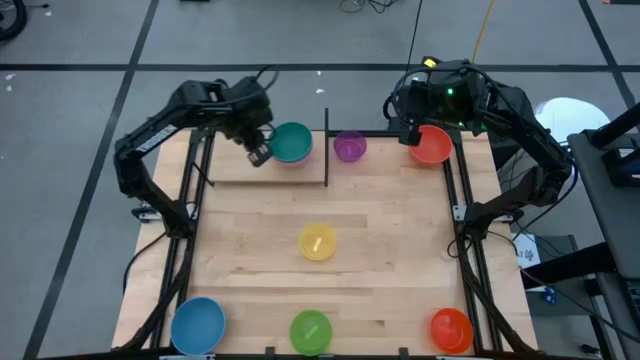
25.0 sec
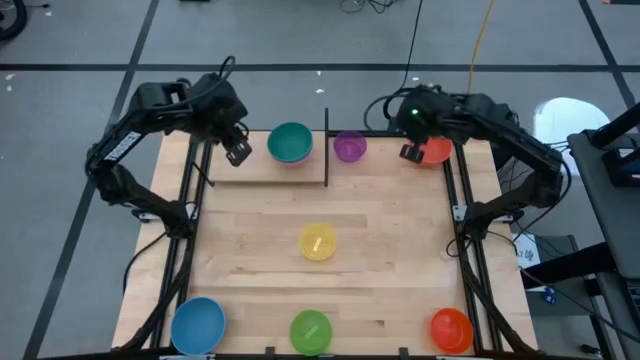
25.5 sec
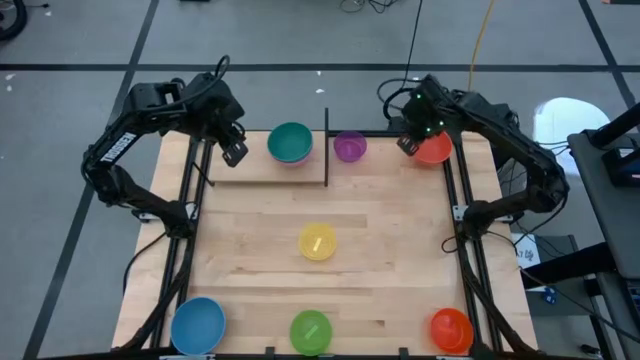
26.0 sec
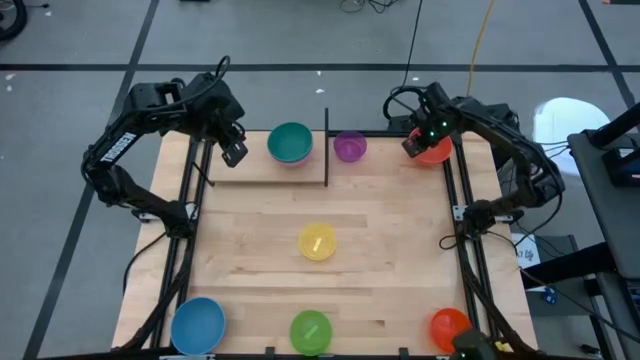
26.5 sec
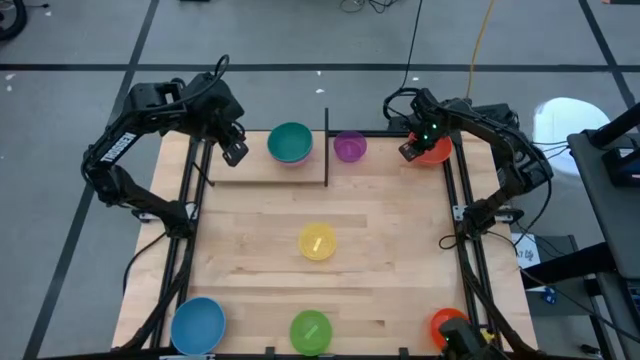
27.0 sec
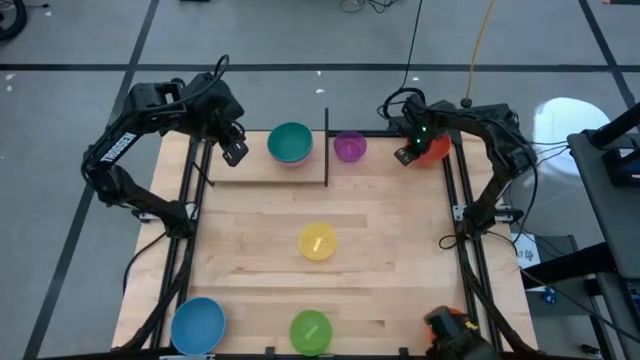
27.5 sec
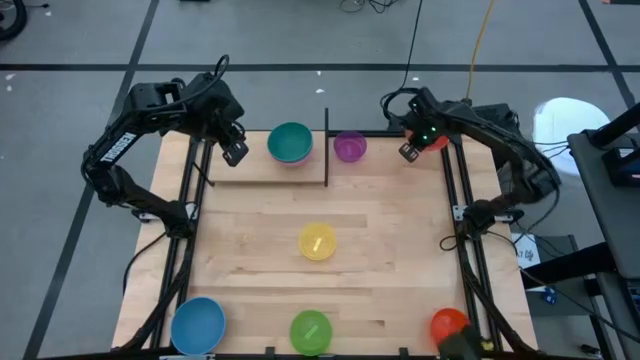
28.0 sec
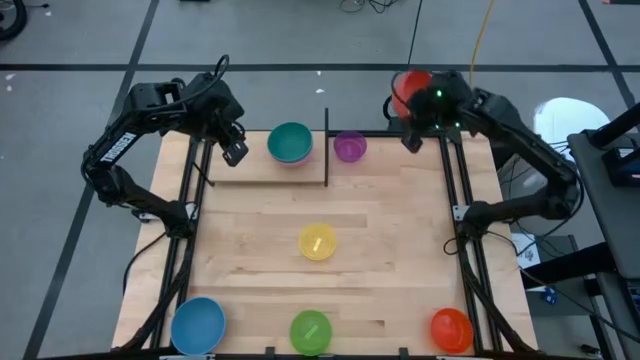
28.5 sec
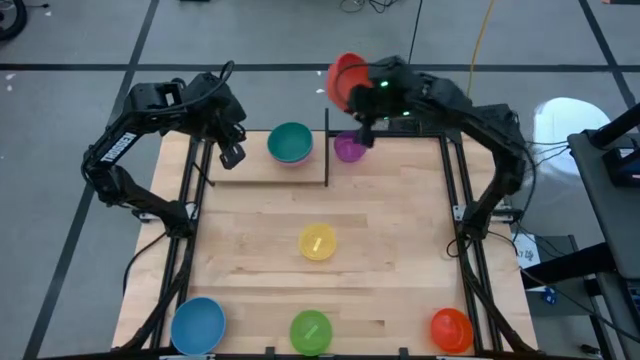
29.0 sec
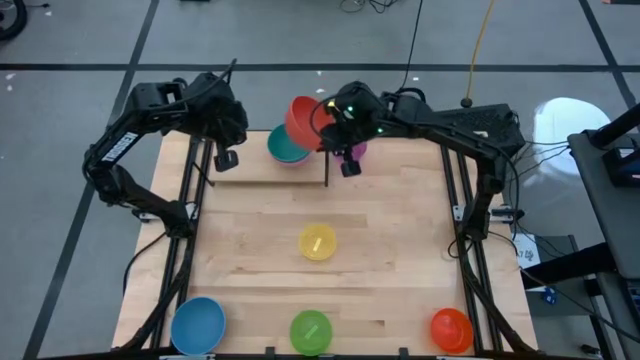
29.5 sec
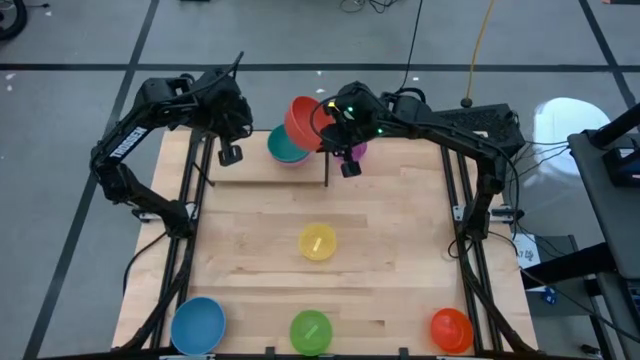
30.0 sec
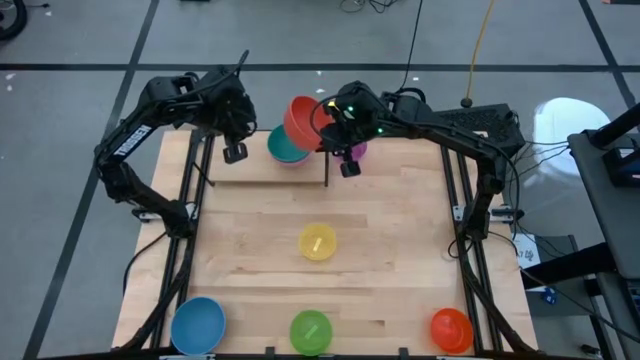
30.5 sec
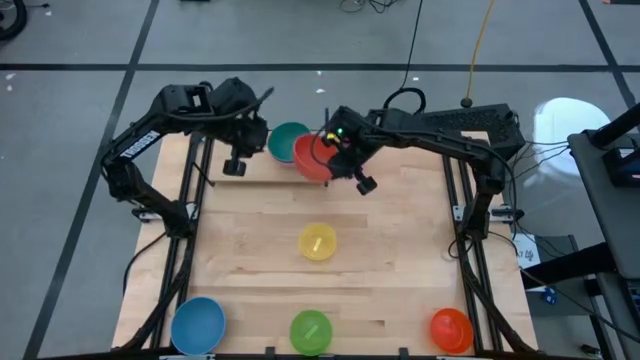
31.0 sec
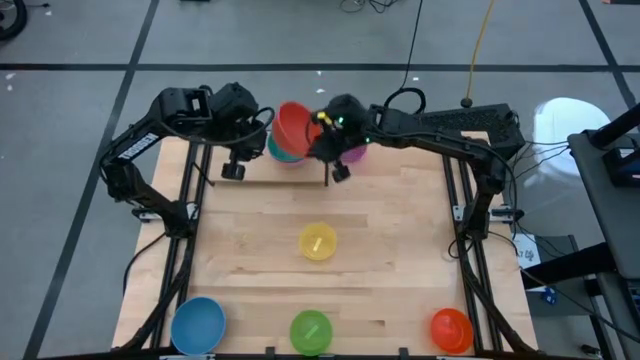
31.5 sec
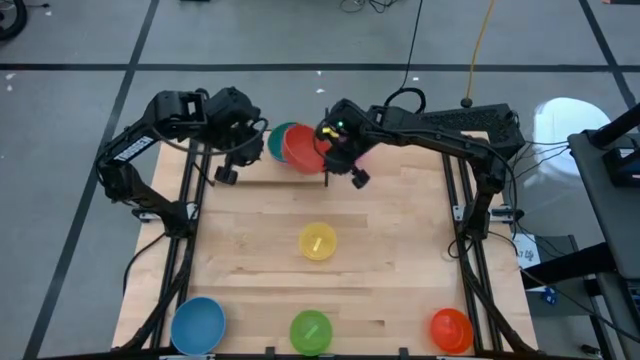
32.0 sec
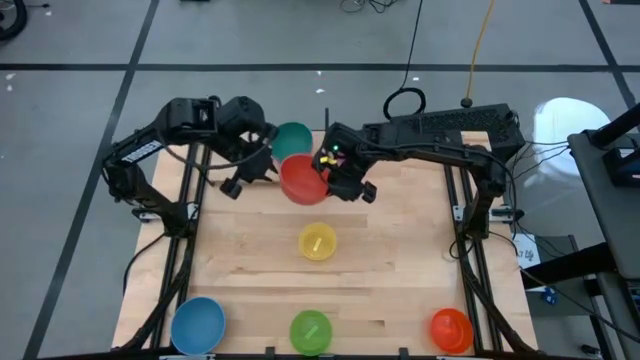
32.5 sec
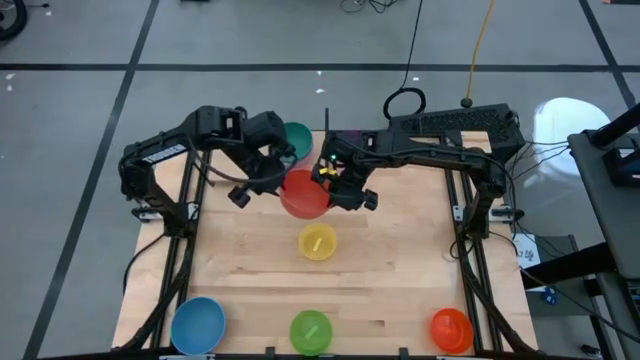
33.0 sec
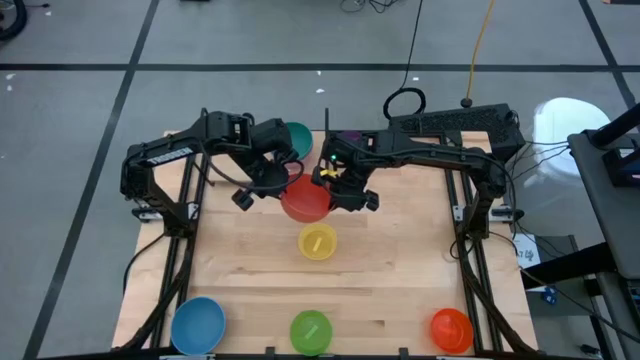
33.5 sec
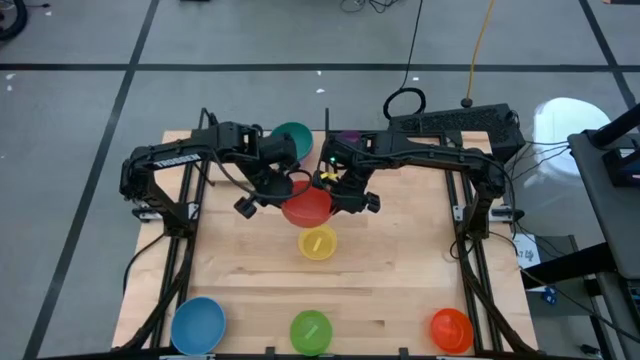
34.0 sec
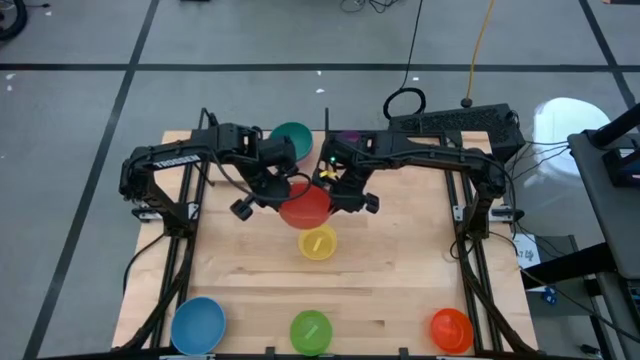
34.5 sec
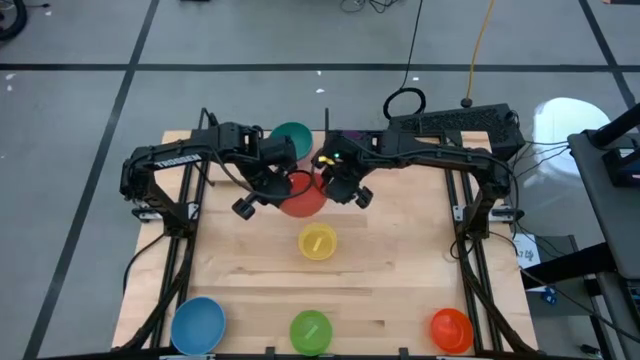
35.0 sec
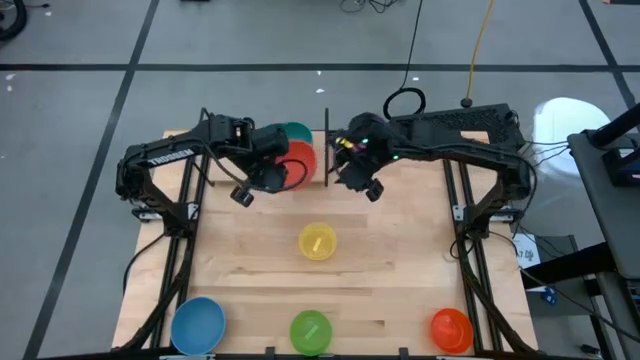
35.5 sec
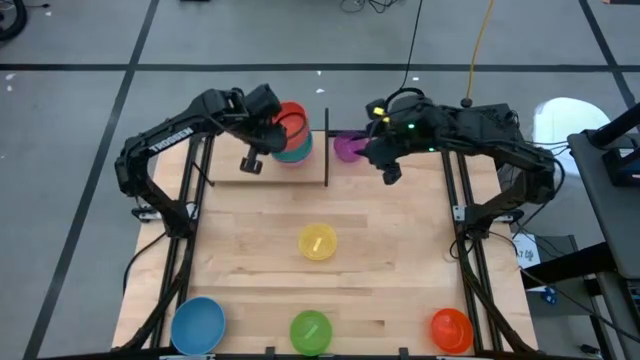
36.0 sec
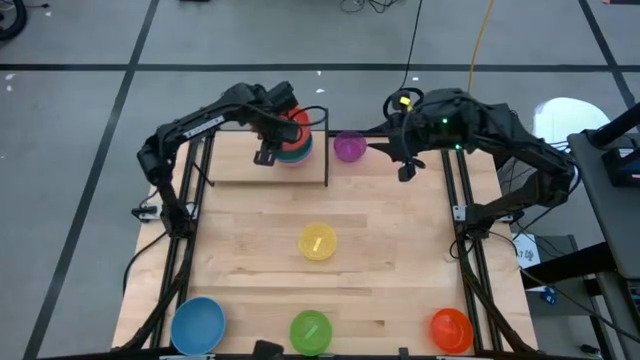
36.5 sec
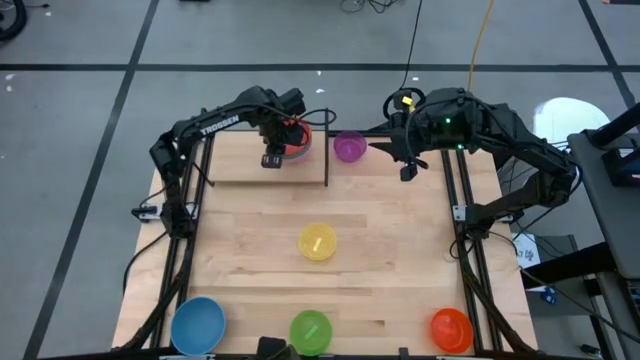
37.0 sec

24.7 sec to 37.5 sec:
Task: Place and stack bowls onto a shelf
Stack the big orange bowl into the green bowl on the shelf
